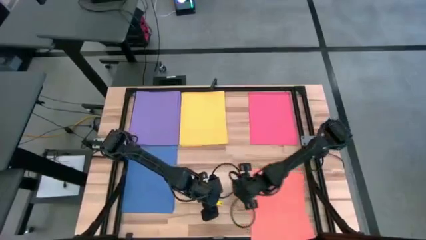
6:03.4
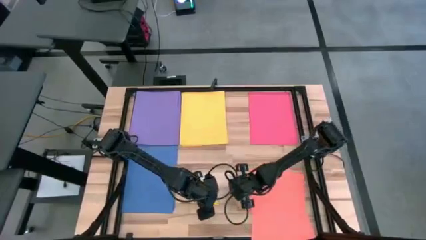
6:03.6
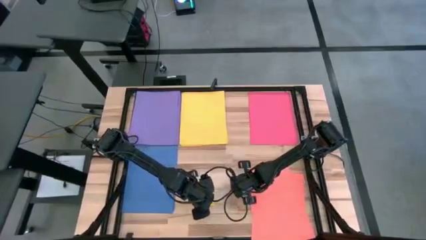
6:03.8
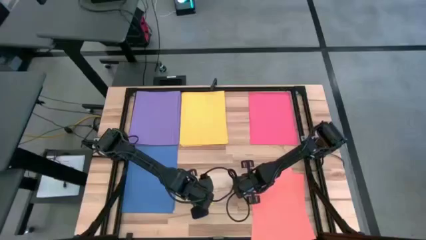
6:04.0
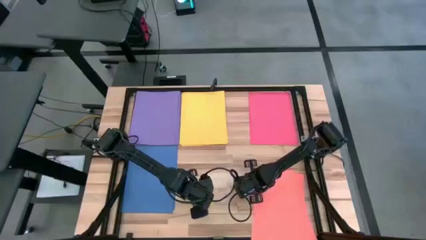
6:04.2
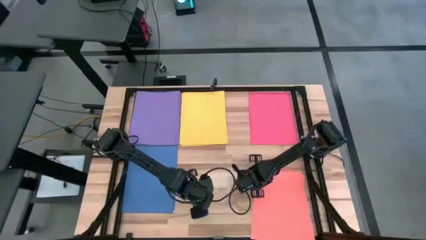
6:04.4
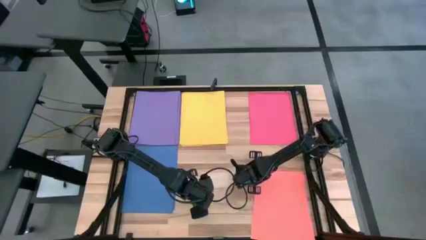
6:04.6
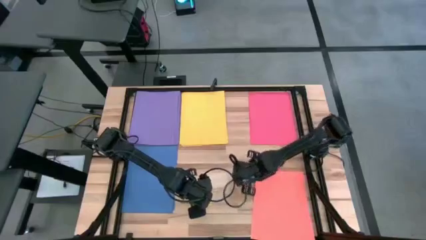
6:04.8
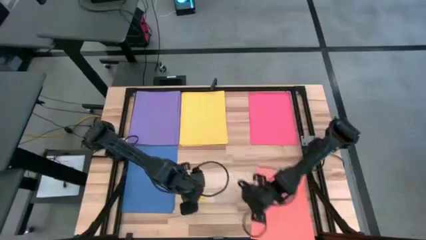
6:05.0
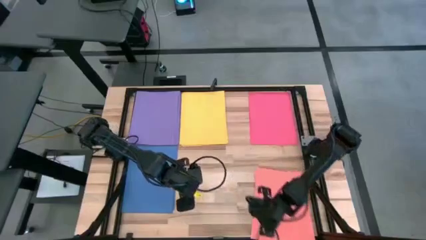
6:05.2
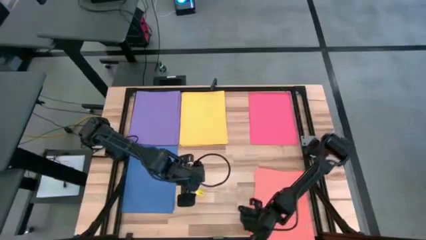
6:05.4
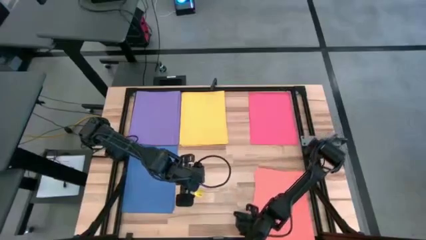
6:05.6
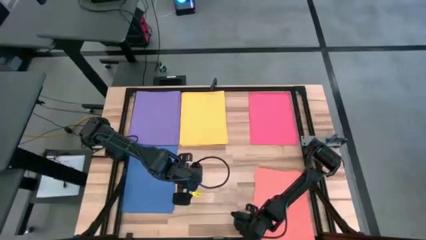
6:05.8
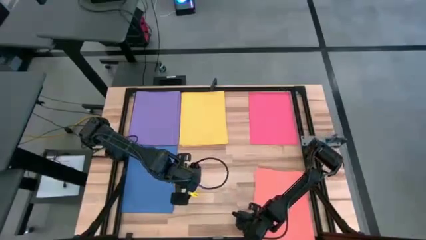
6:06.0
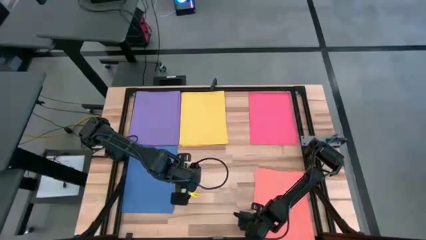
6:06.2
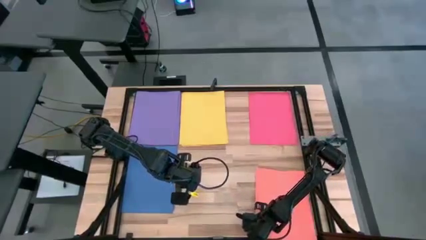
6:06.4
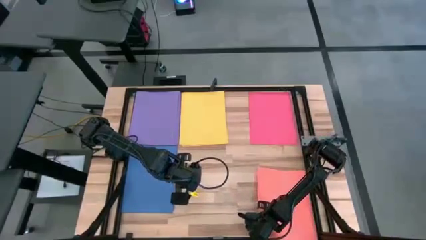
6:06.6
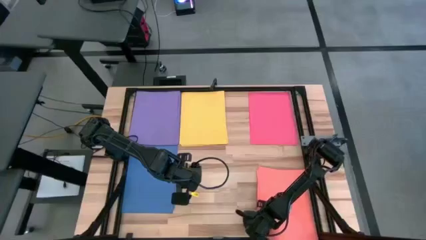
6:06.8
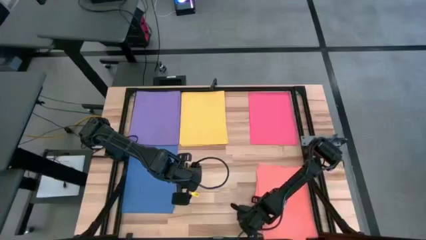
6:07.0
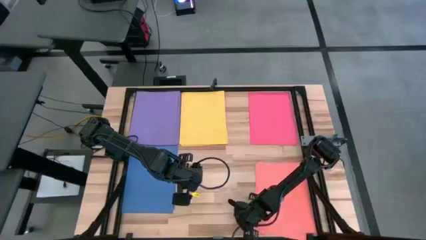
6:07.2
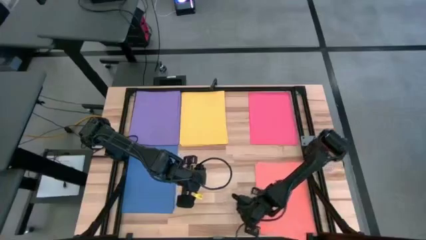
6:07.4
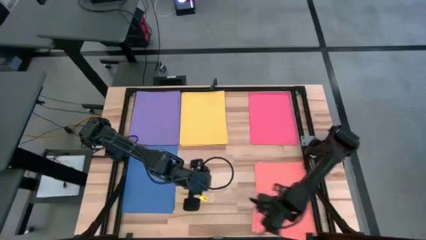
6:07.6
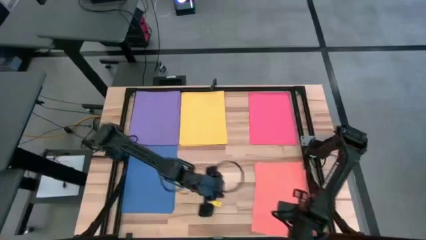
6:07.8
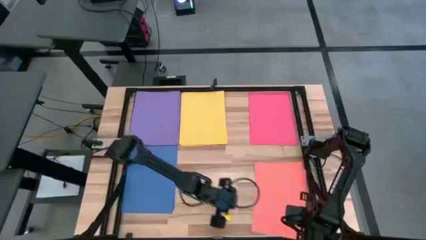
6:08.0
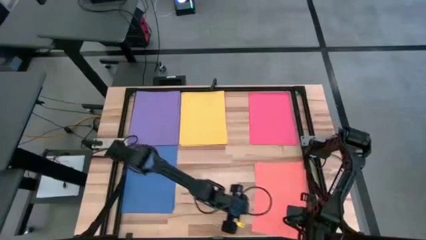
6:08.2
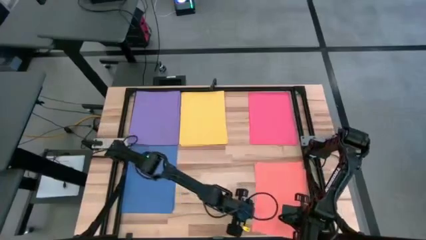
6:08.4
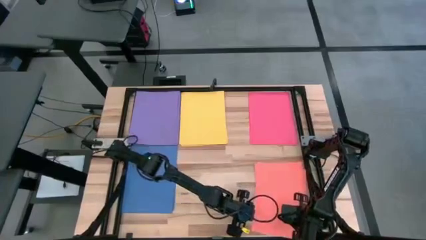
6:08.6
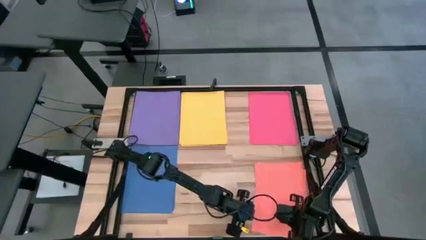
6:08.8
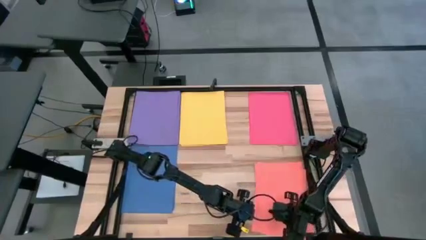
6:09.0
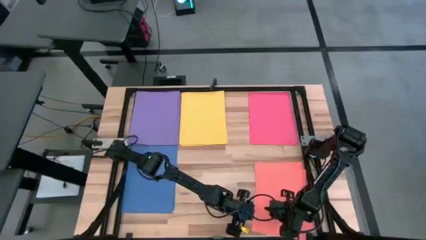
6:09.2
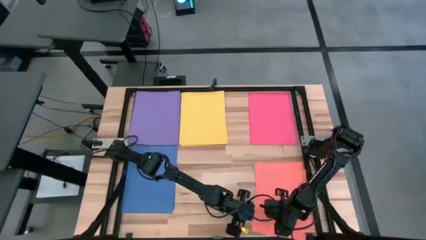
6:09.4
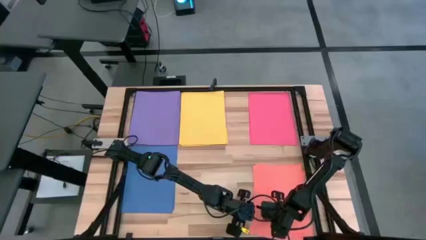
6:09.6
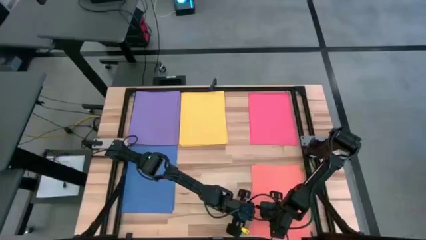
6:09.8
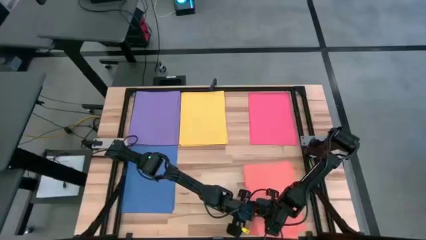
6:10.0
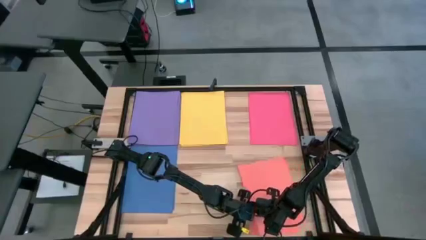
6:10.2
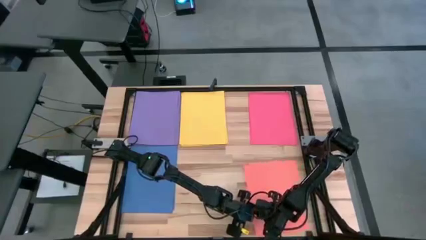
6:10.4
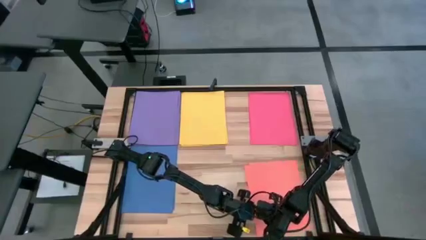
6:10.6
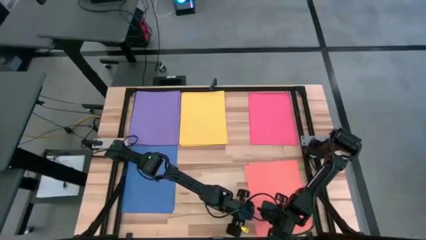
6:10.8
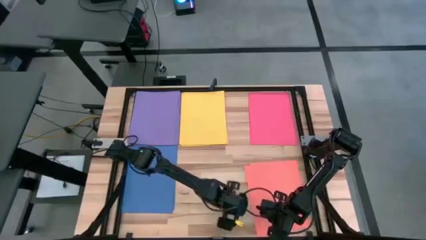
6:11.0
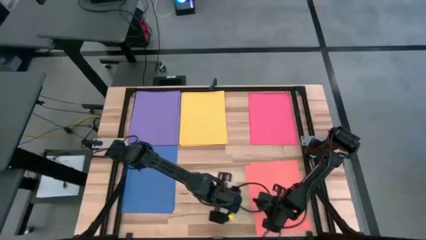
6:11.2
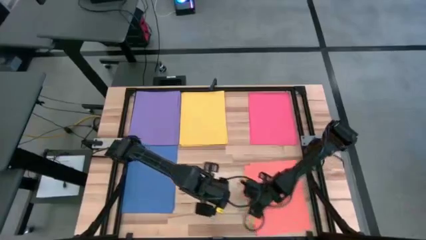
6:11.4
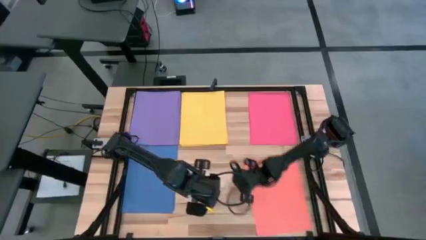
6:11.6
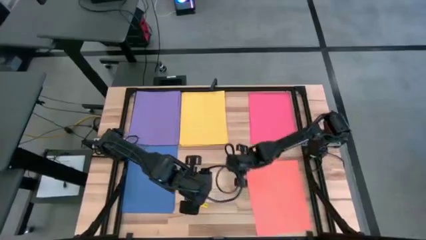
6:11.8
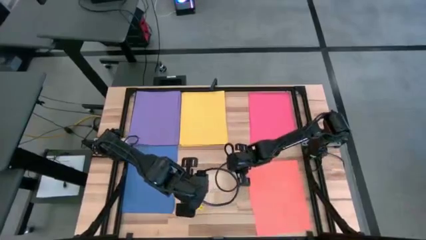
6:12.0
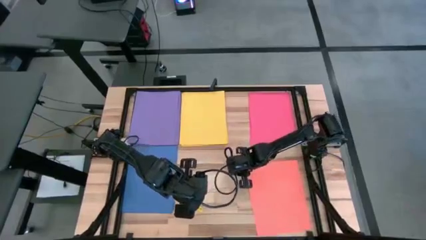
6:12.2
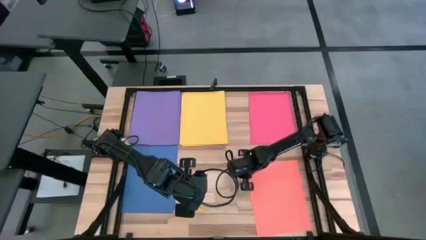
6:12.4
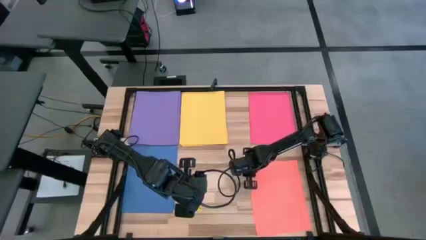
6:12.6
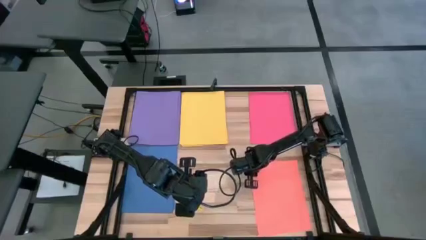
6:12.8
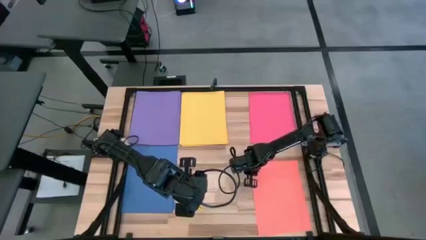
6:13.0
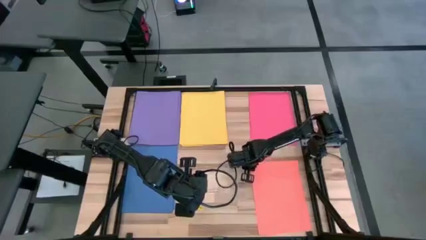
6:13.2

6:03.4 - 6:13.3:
Task: Organize paper
Stack the orange paper on top of the orange paper

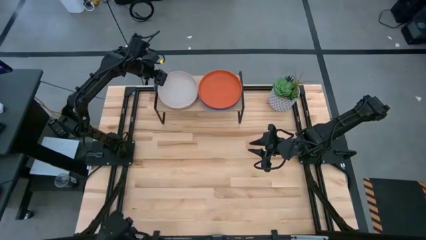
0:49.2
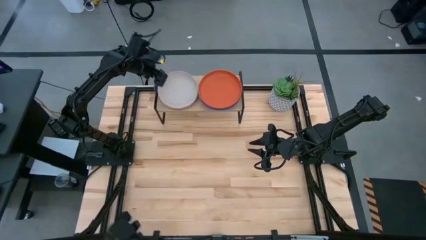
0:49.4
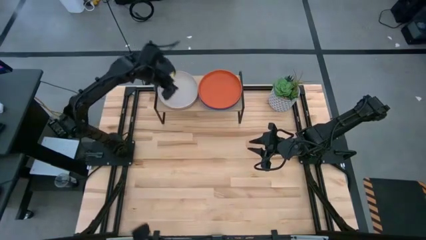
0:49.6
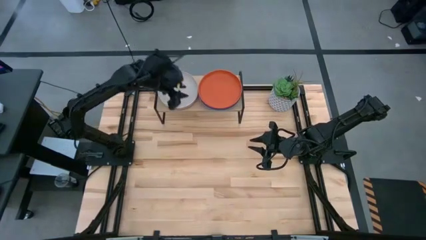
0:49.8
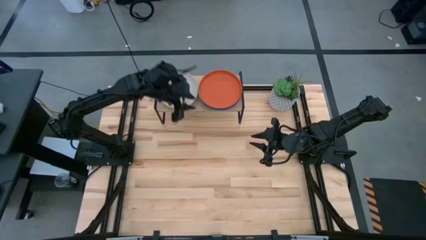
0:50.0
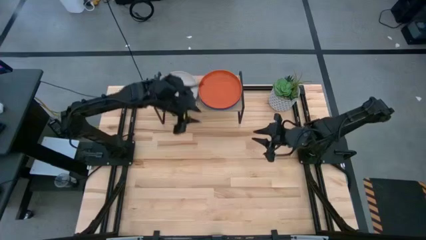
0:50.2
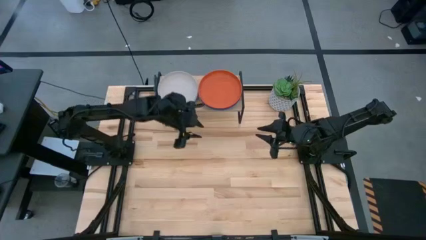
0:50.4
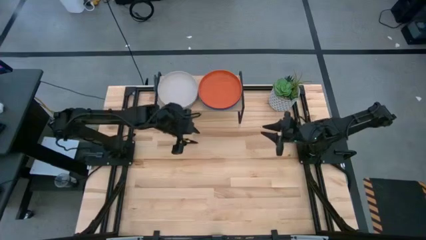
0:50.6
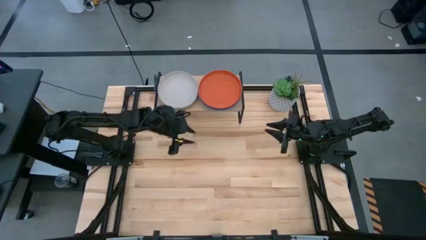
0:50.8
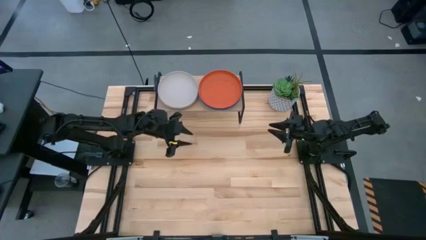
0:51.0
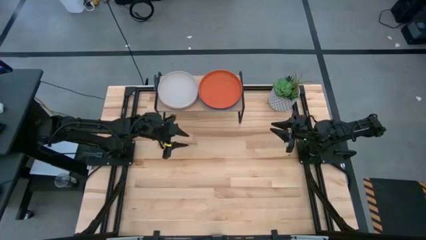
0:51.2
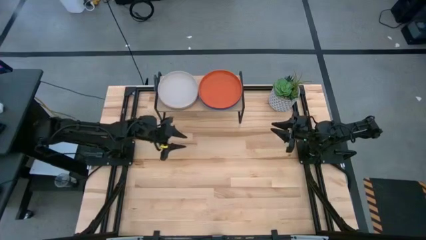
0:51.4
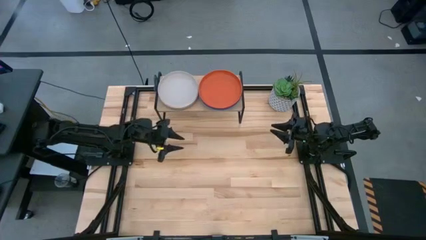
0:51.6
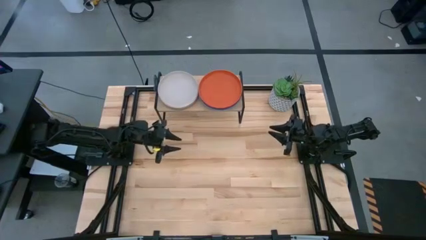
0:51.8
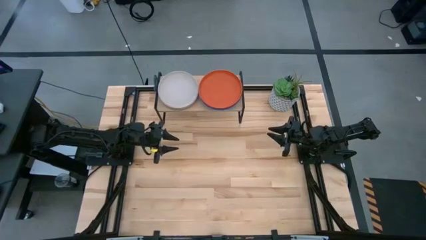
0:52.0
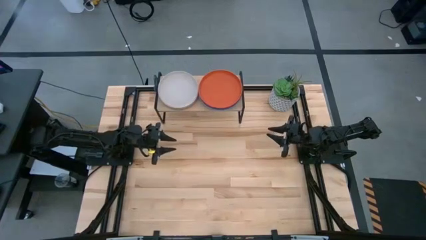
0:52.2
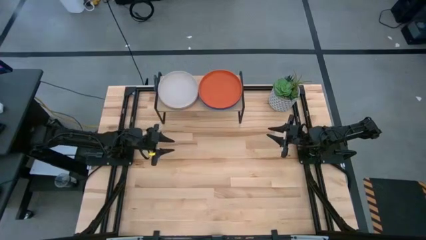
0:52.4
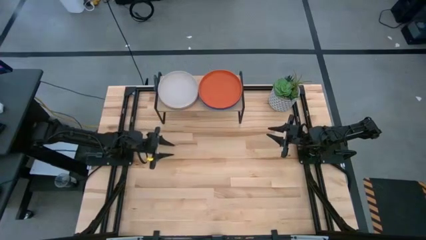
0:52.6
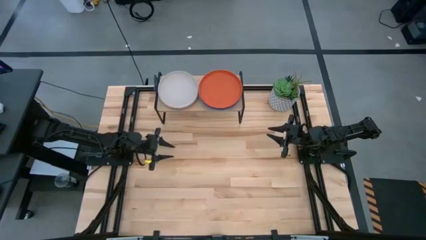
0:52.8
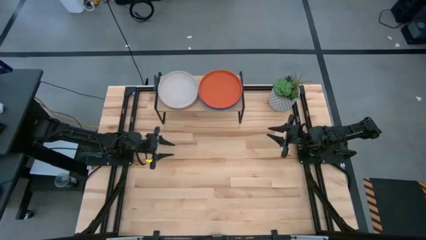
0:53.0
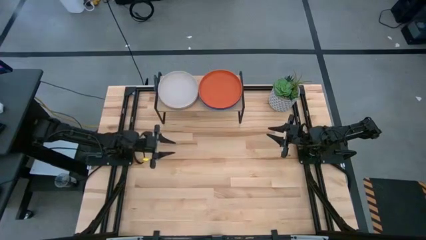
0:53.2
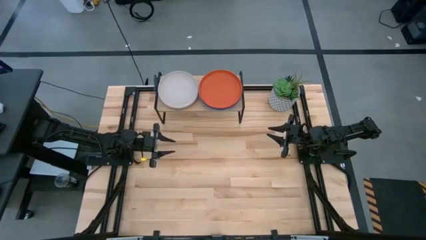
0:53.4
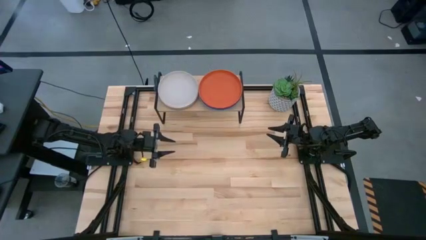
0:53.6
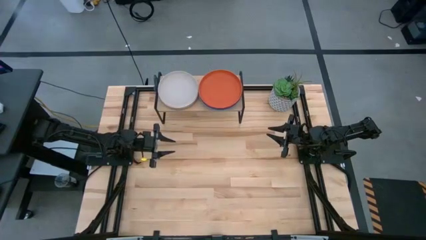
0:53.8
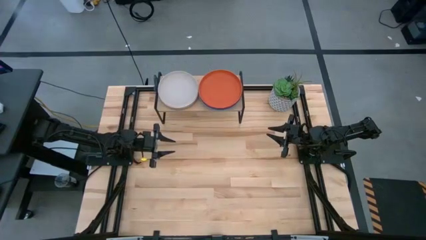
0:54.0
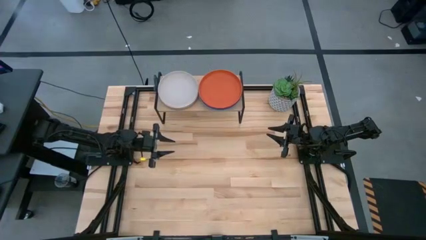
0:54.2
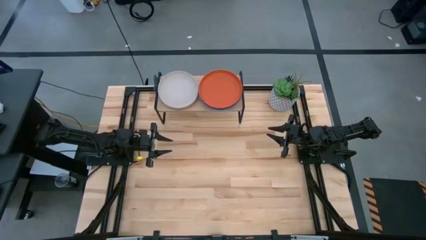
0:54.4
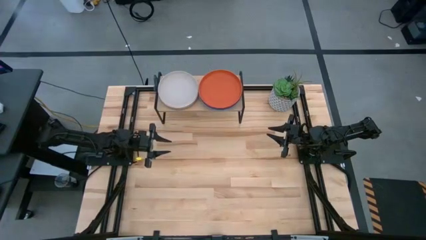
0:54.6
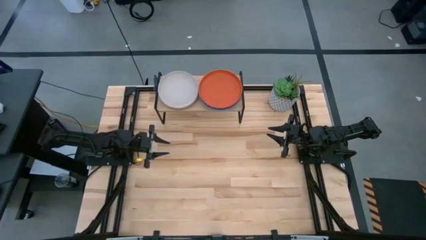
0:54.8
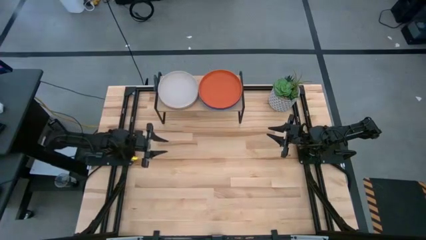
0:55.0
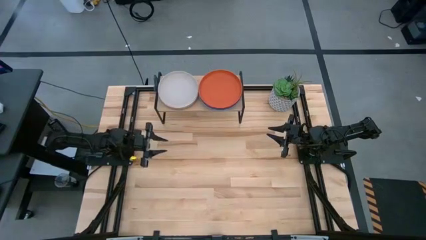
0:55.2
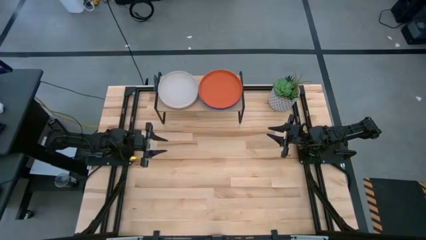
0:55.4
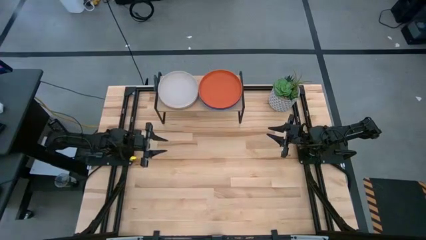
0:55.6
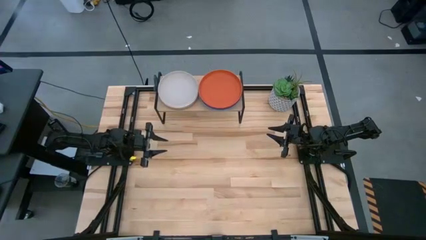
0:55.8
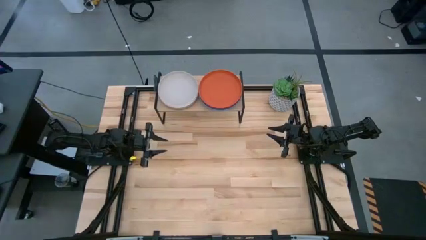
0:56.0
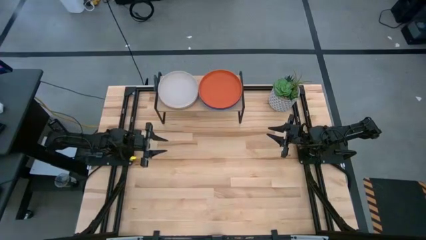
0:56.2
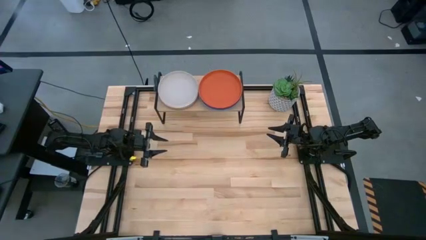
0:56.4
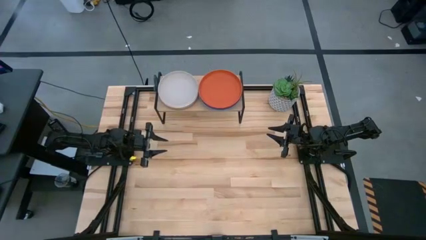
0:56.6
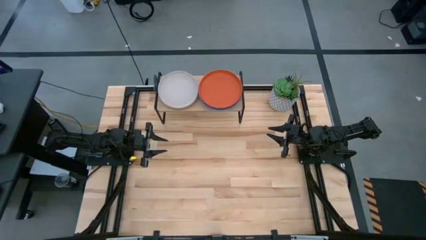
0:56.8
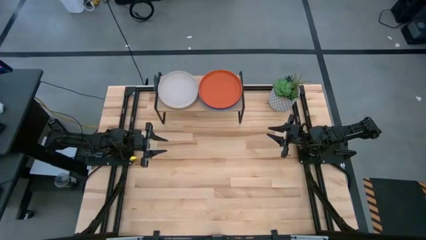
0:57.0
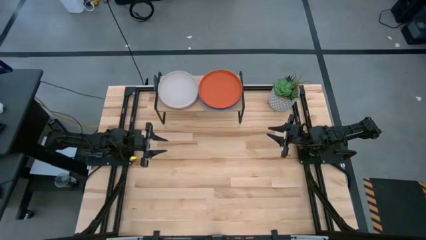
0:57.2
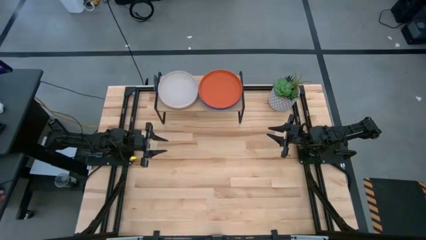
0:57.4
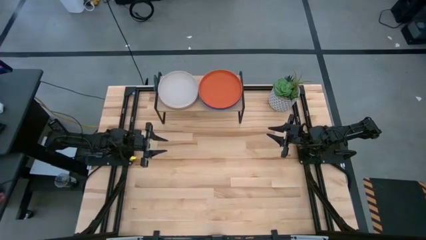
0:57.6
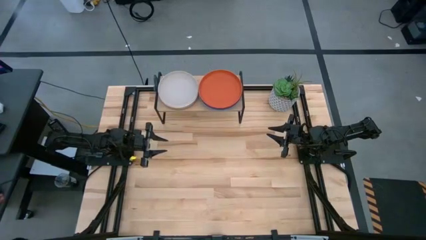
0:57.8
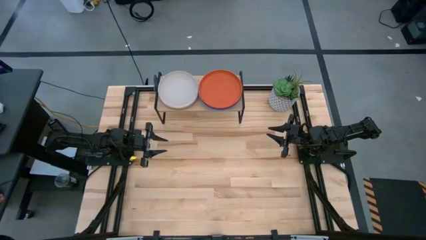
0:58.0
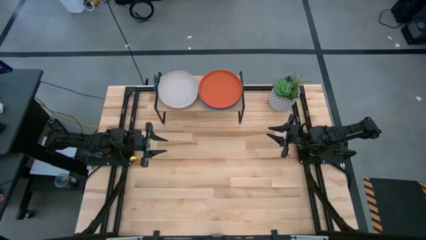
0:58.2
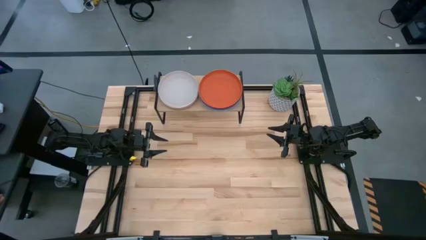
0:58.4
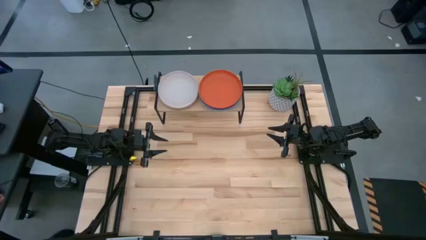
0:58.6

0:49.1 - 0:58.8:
Task: Place and stack plates onto a shelf
Return to Home Position
